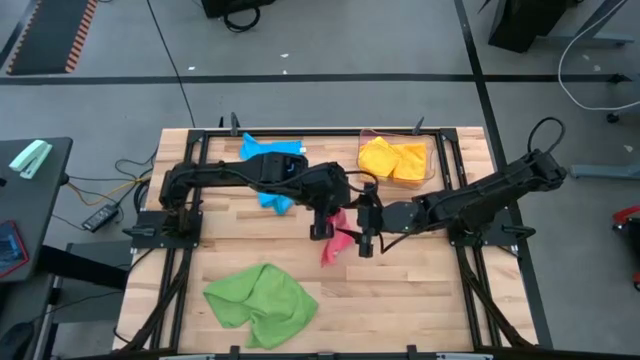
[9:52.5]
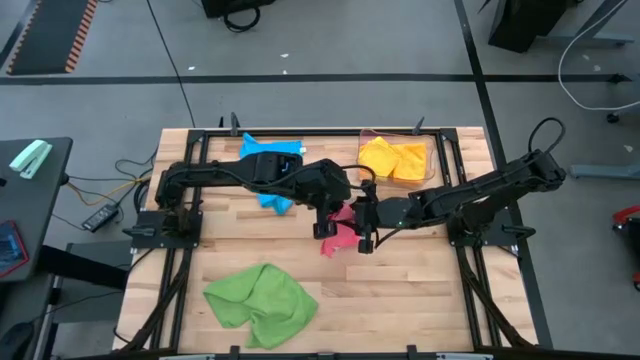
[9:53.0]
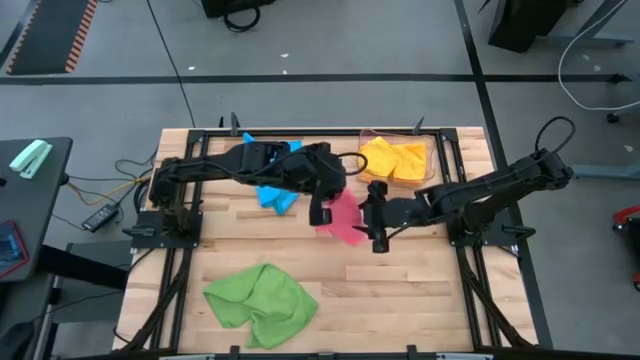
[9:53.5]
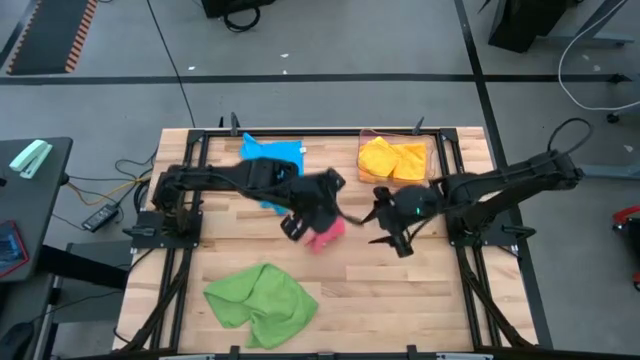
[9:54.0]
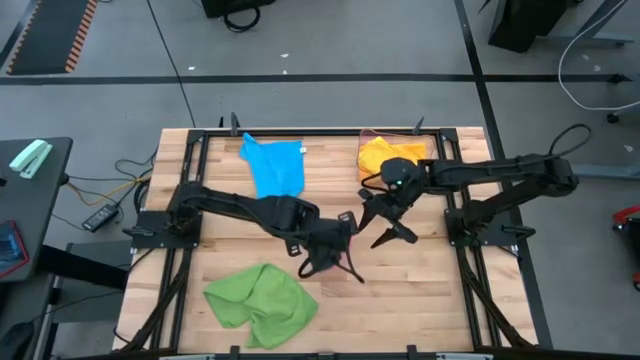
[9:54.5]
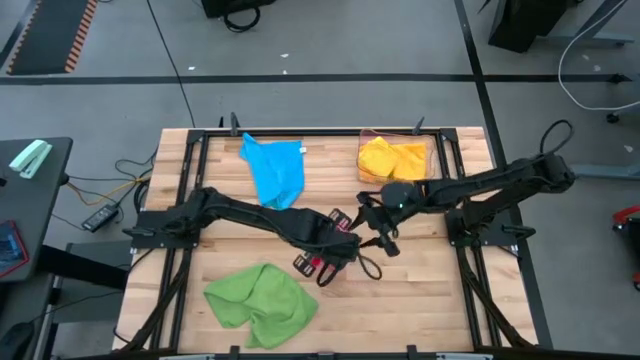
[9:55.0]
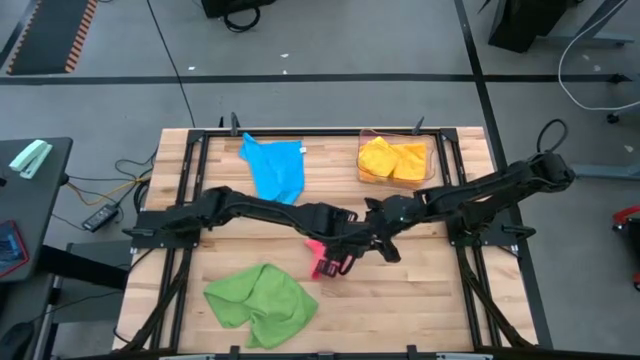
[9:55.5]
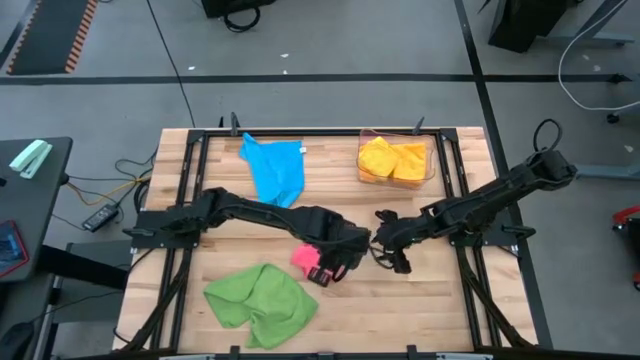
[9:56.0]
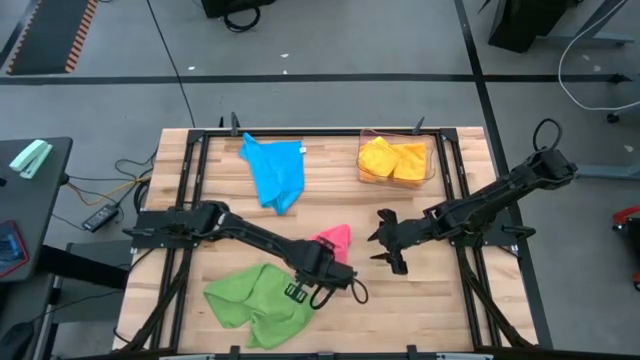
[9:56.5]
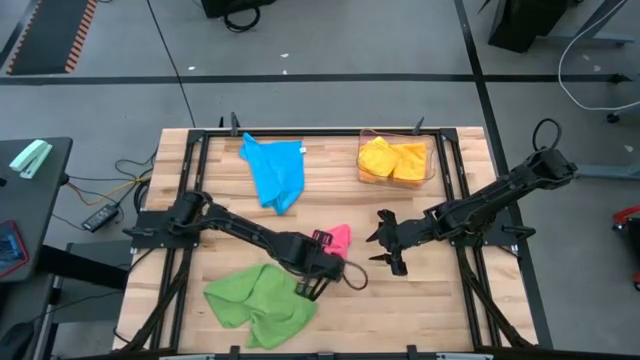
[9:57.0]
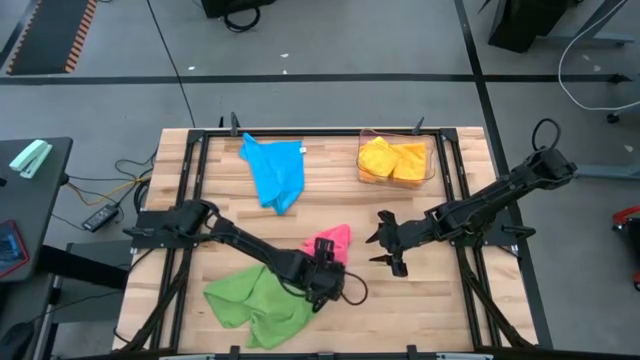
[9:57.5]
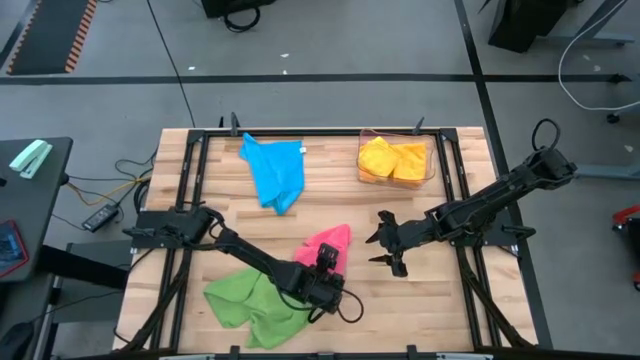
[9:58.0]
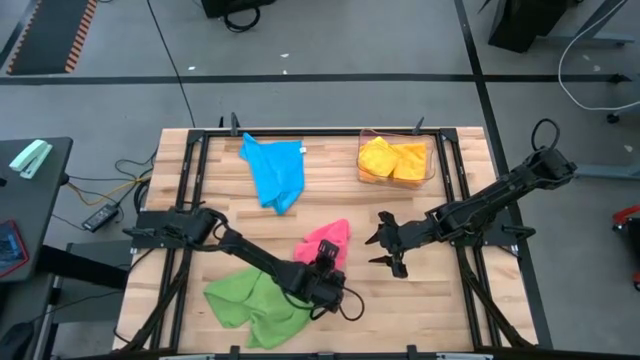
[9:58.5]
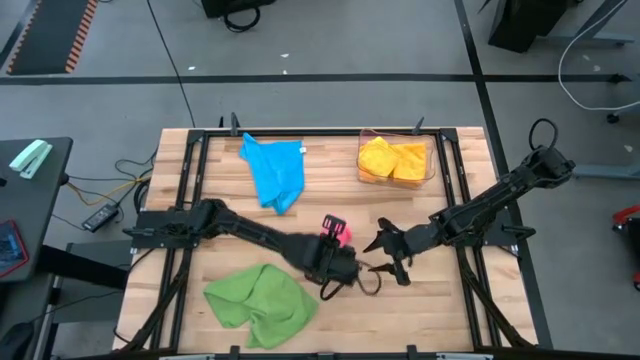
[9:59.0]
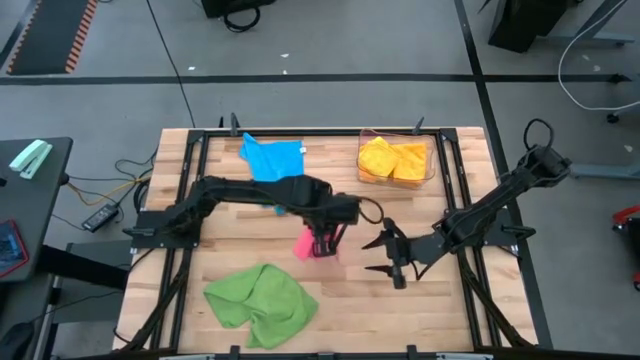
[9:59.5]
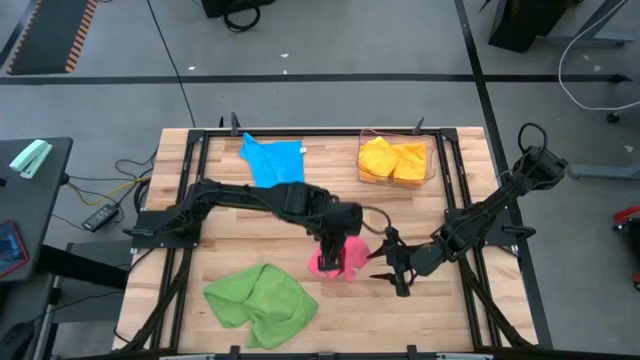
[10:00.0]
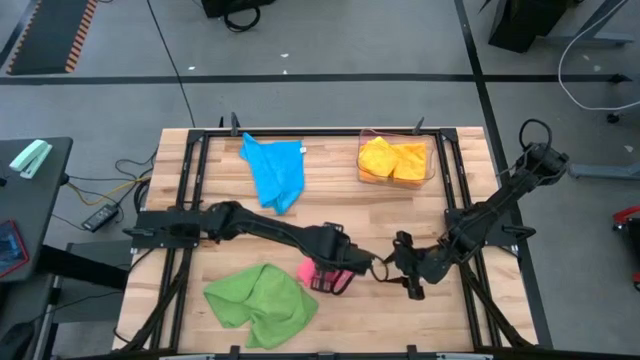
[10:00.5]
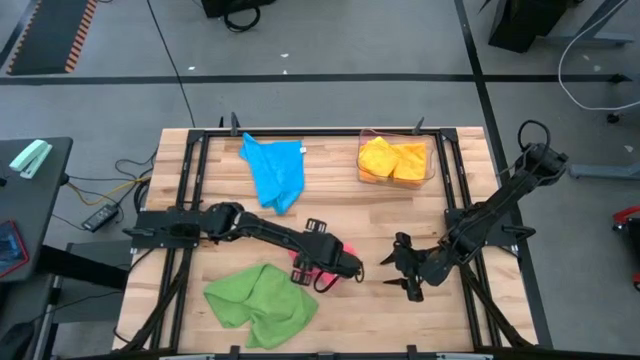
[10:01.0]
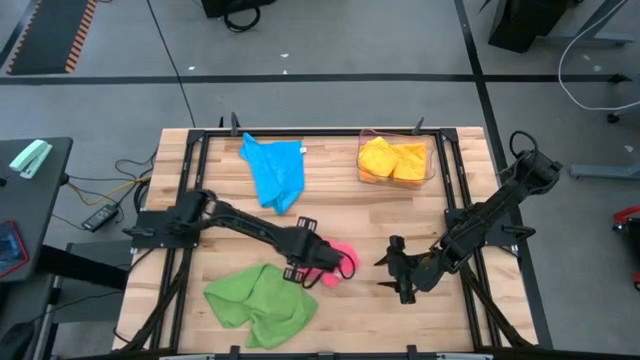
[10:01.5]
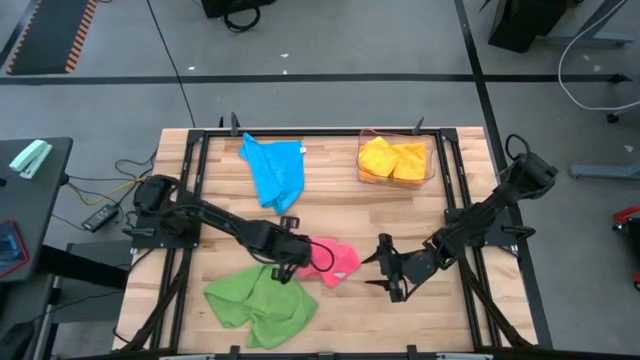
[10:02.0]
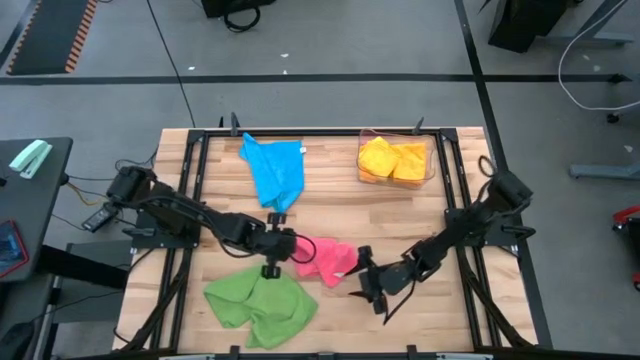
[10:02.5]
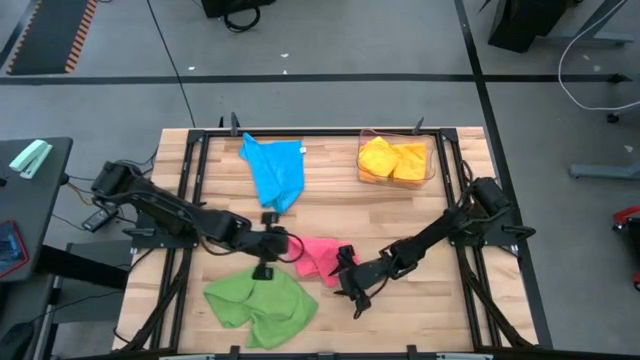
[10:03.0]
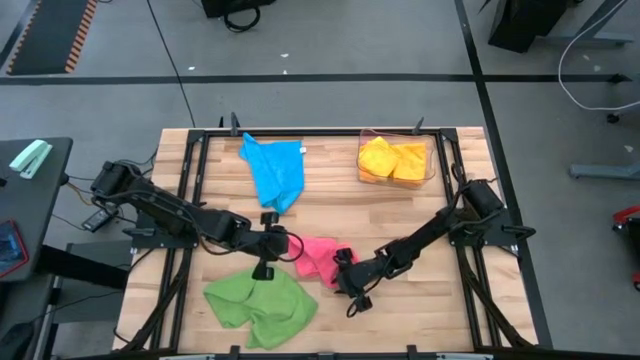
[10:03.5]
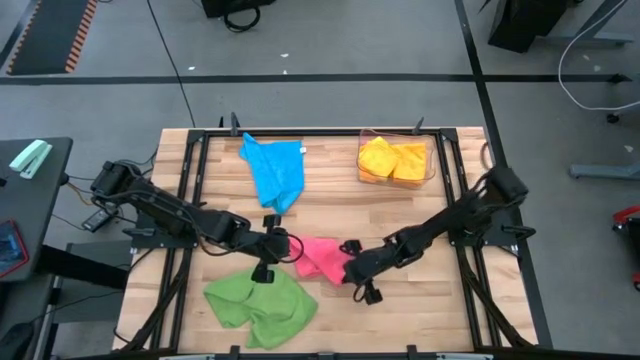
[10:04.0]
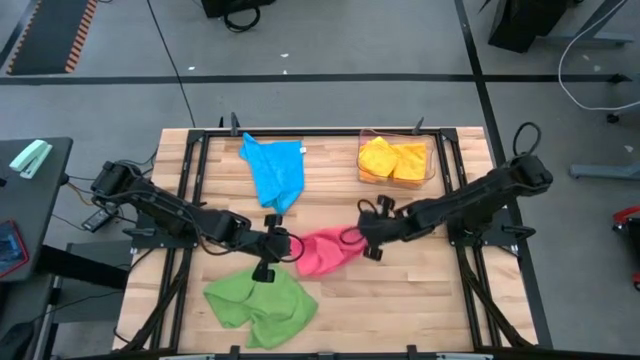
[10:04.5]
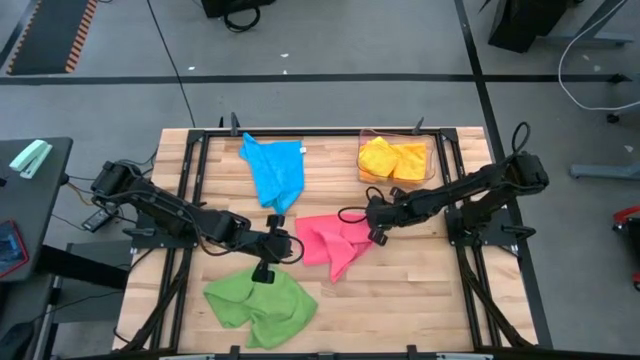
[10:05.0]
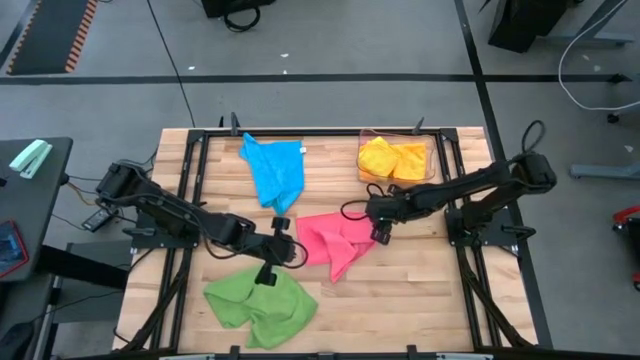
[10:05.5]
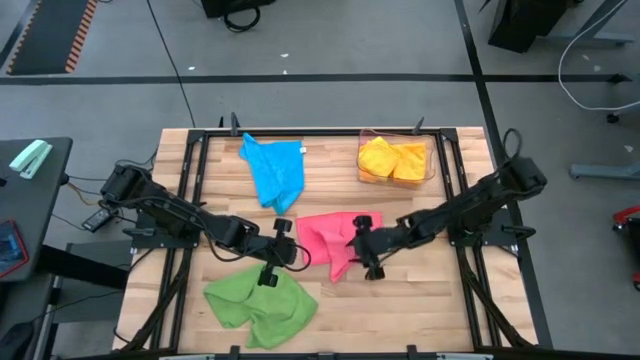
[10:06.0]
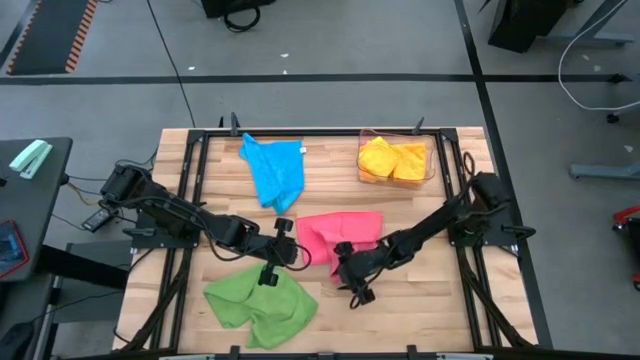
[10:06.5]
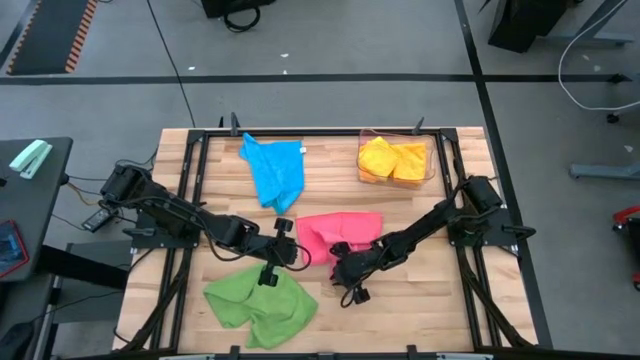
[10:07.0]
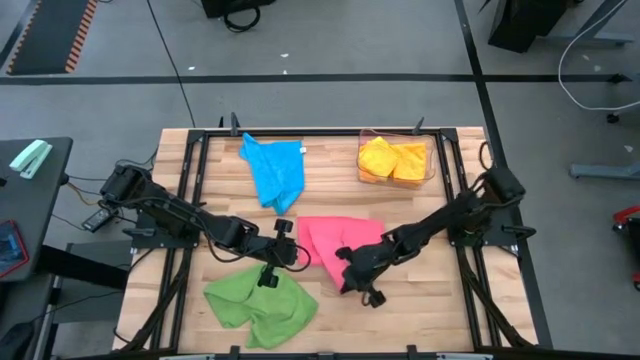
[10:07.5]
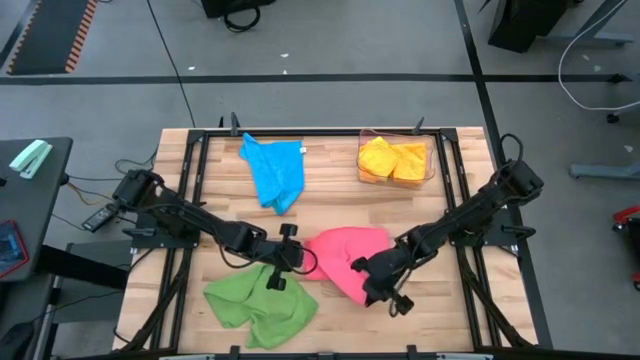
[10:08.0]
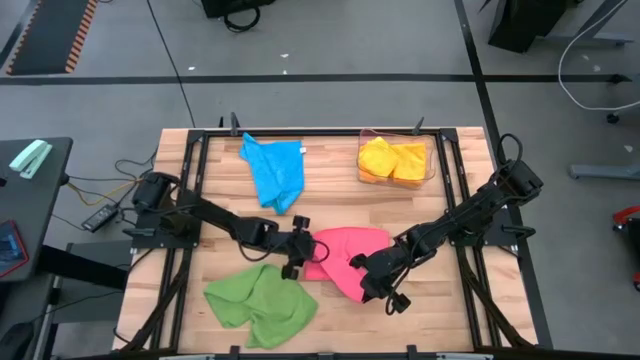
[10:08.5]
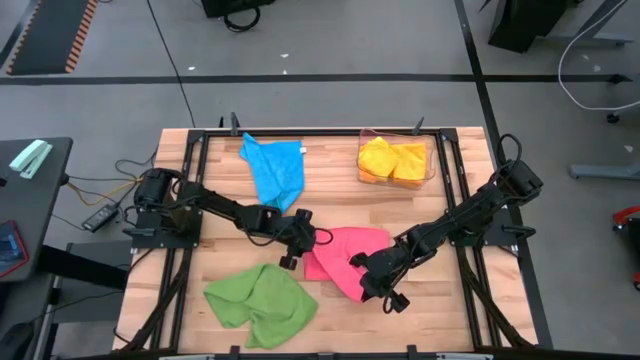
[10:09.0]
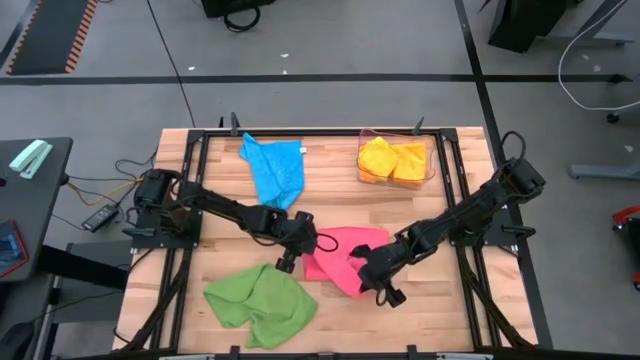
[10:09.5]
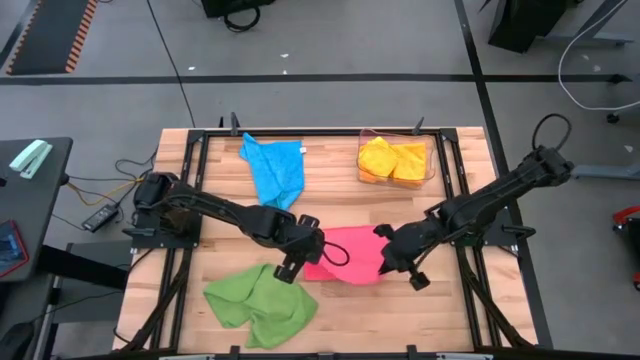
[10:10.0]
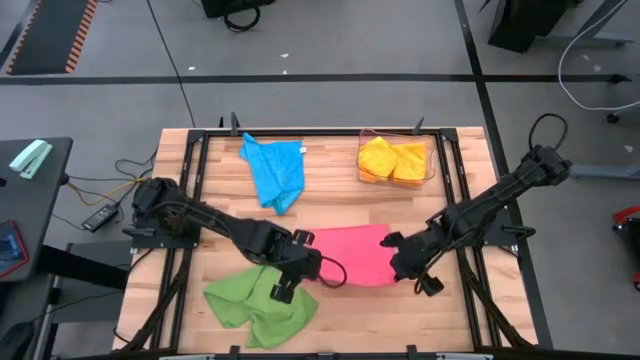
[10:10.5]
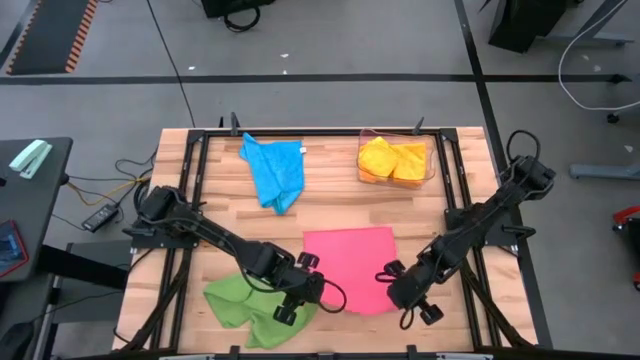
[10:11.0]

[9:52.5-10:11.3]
Task: Fold microfiber towels
Fold the pink microfiber cloth
